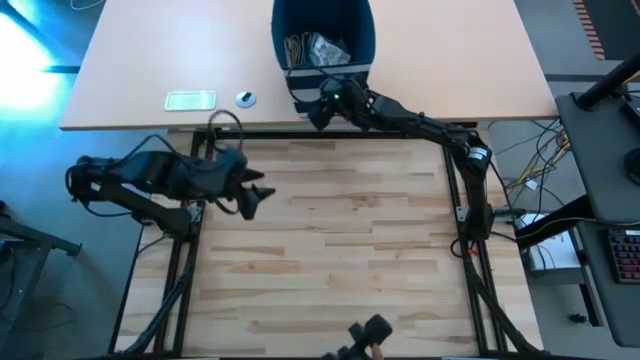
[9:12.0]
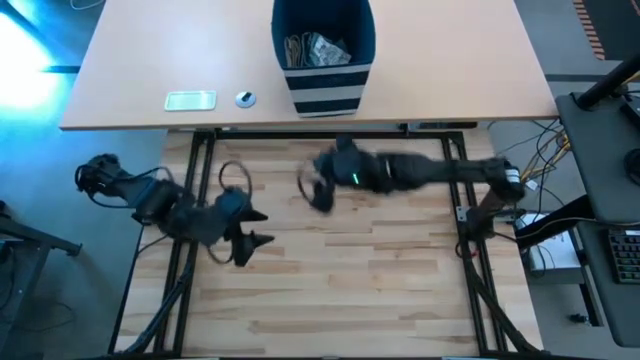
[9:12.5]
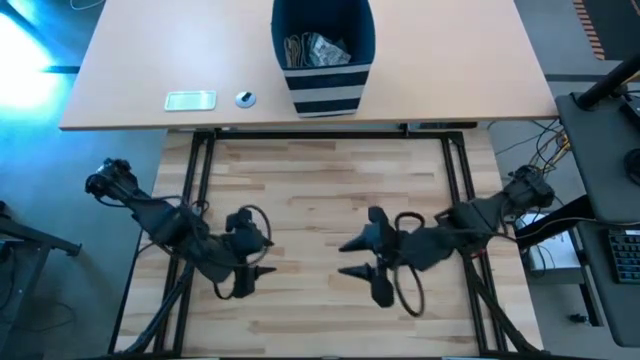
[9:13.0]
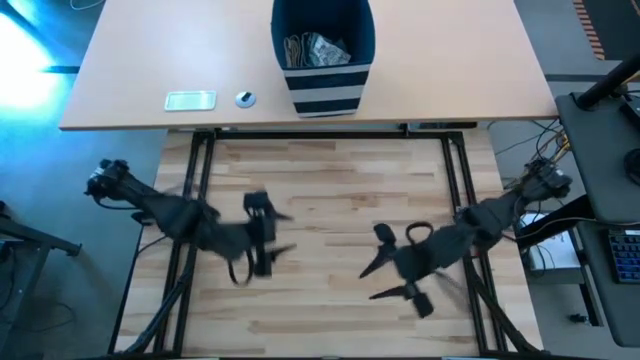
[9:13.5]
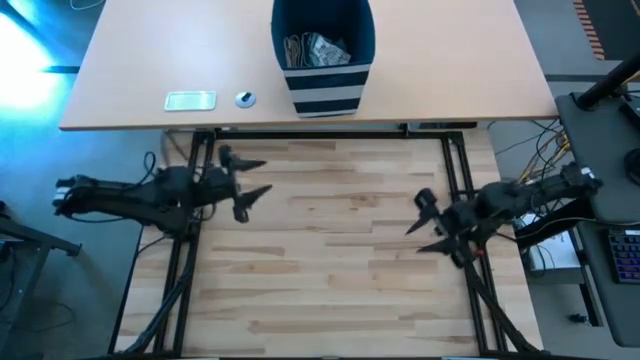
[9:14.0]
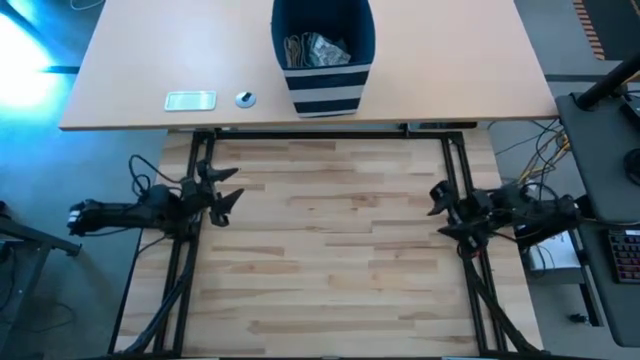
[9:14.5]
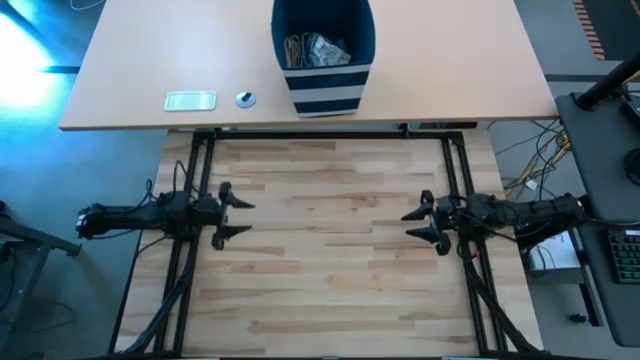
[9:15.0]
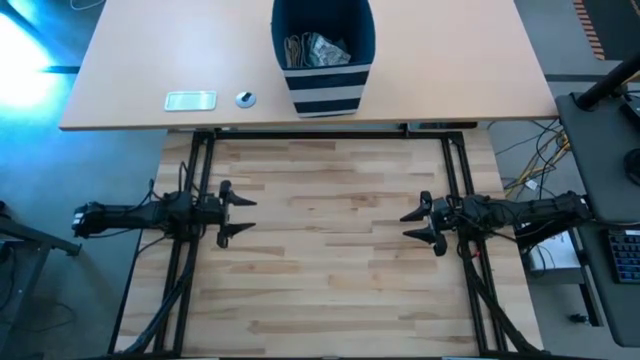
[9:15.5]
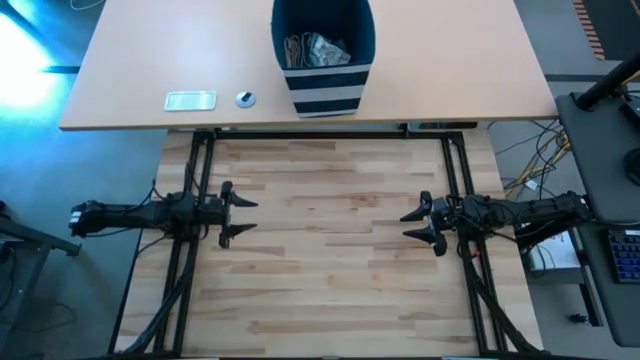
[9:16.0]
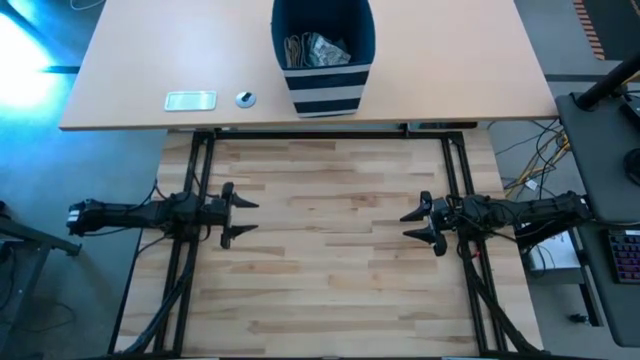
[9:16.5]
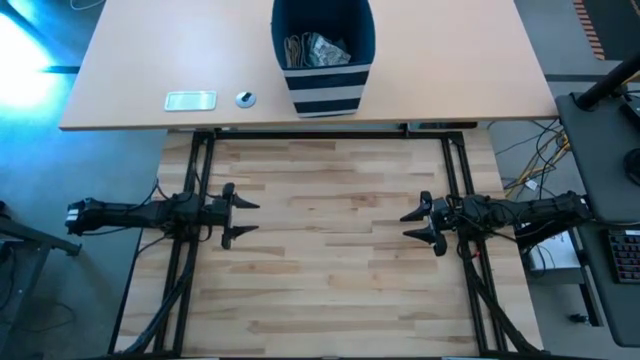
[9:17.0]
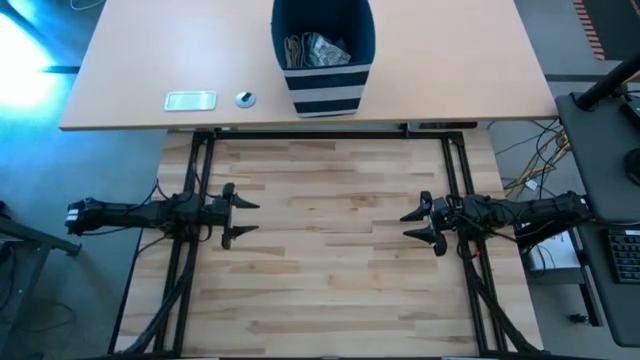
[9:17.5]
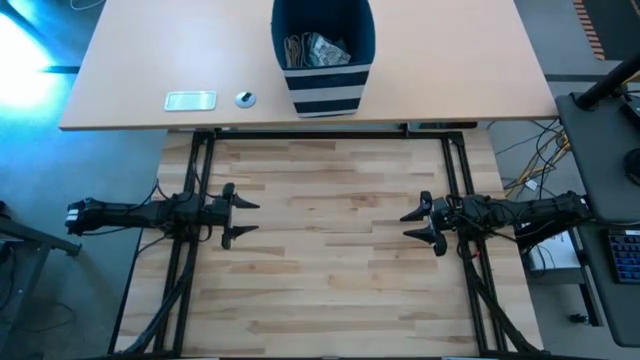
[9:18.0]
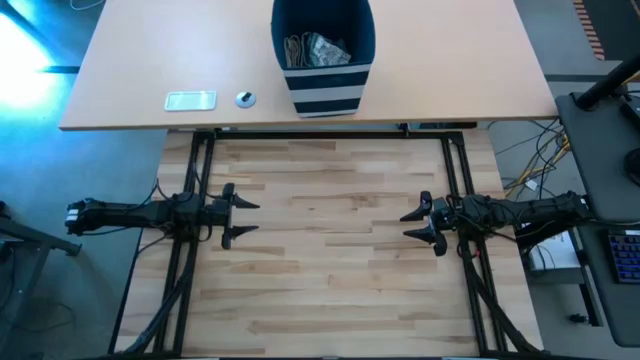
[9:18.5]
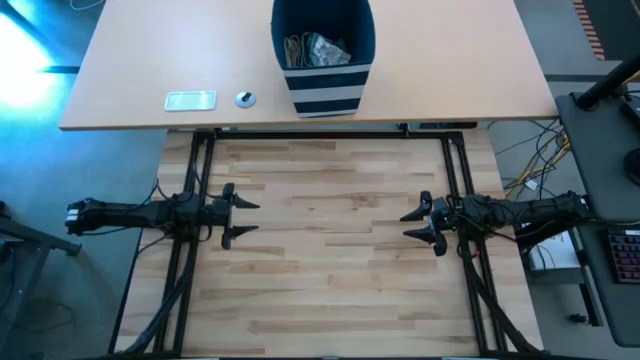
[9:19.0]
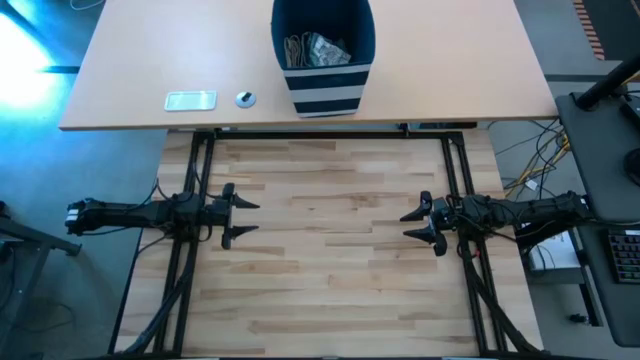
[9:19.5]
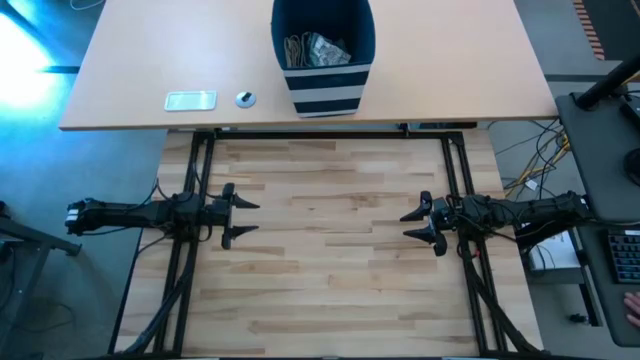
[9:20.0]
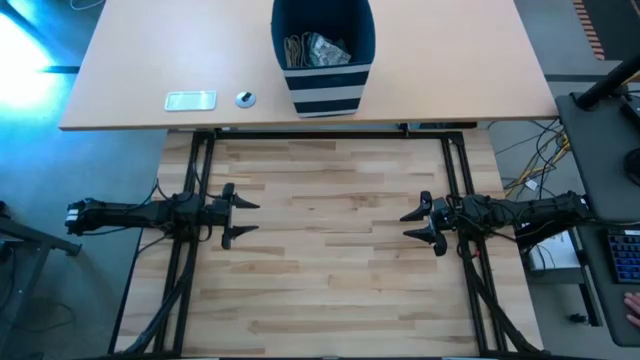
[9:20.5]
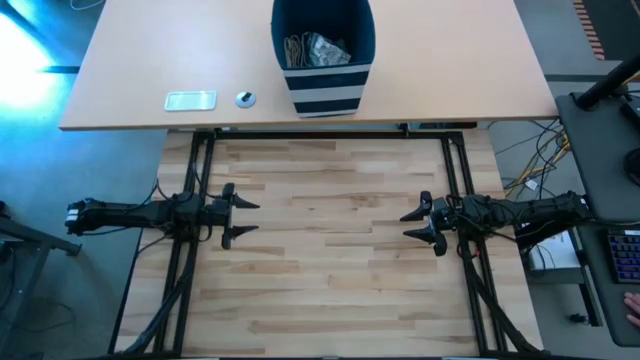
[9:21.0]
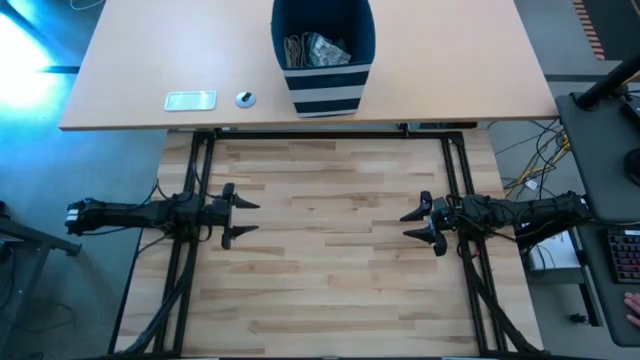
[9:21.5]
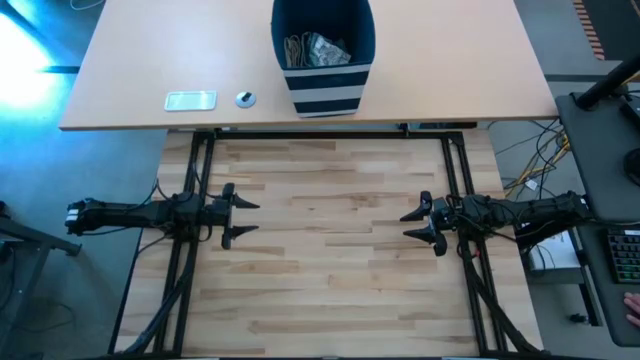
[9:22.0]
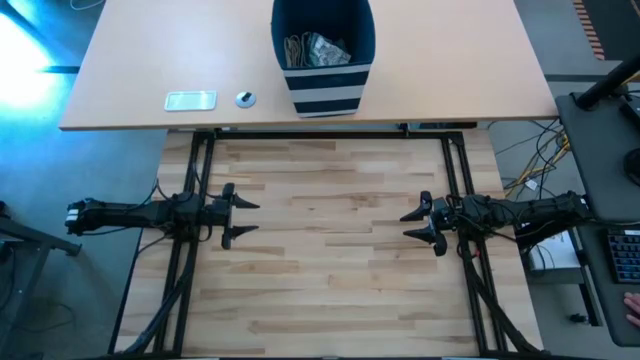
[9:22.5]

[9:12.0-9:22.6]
Task: Fold Laundry from Bin
Return to Home Position

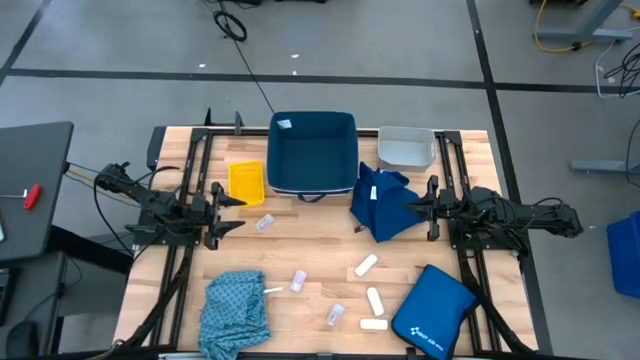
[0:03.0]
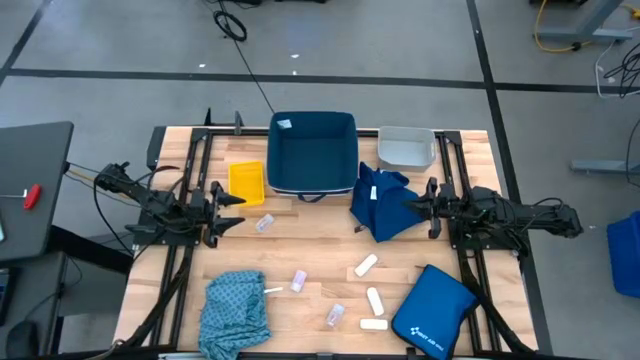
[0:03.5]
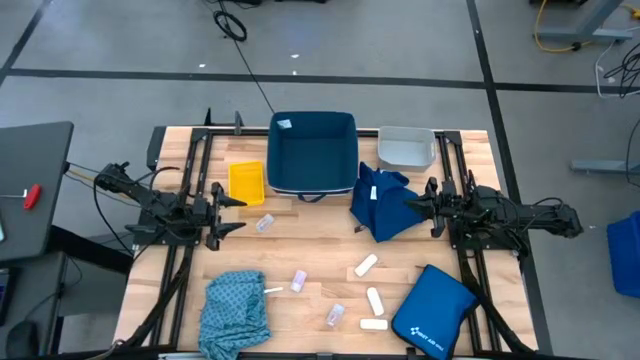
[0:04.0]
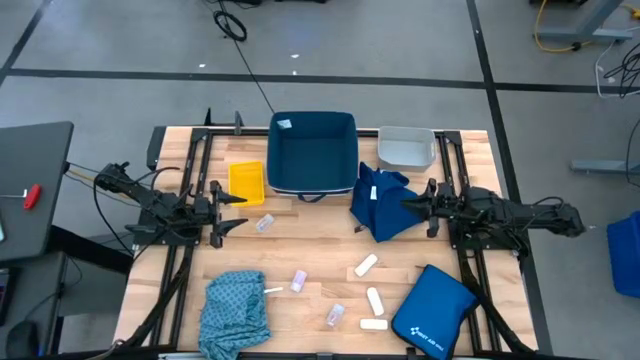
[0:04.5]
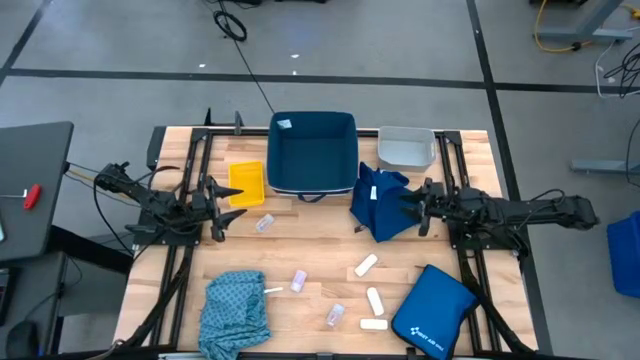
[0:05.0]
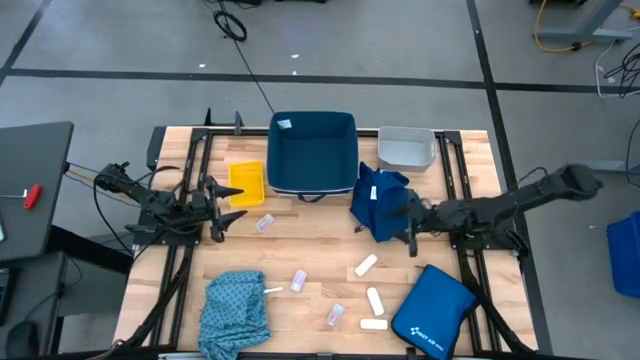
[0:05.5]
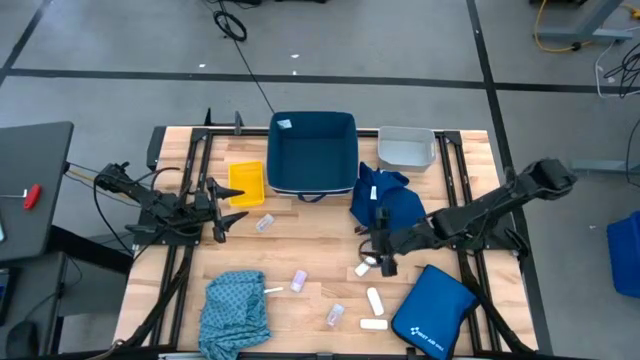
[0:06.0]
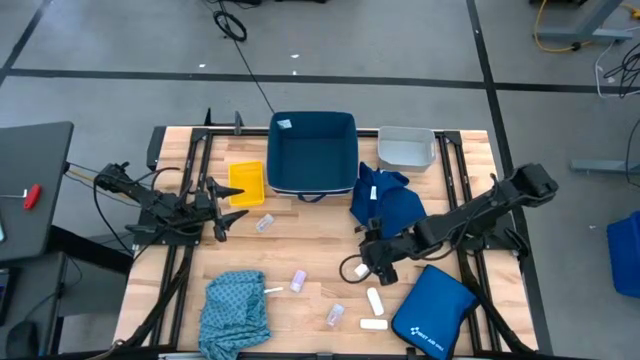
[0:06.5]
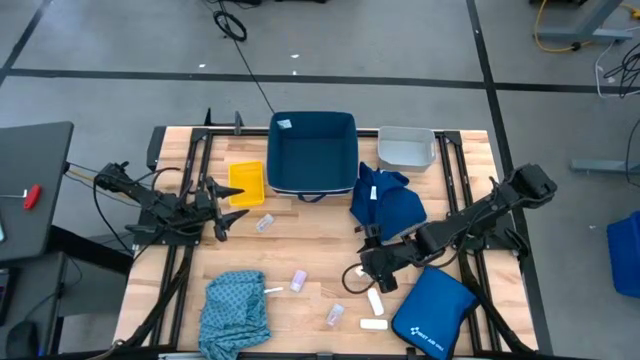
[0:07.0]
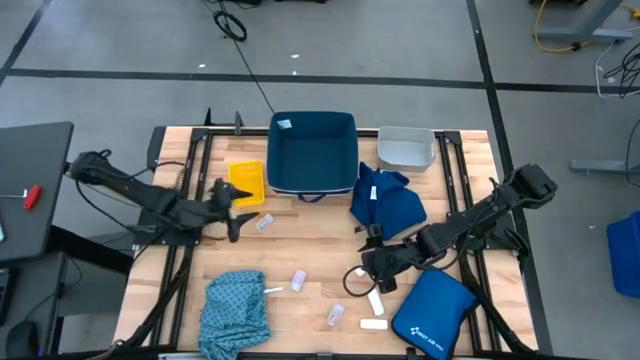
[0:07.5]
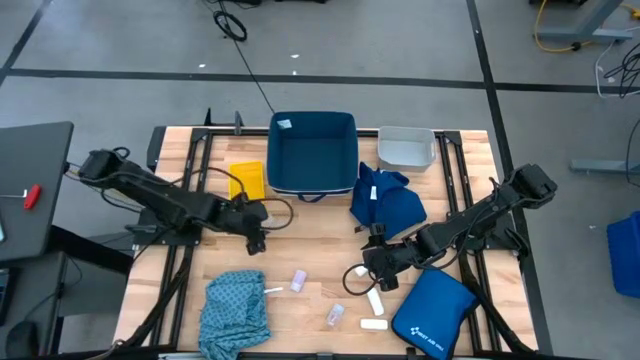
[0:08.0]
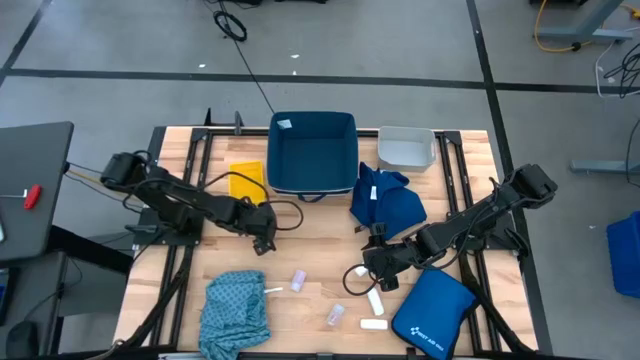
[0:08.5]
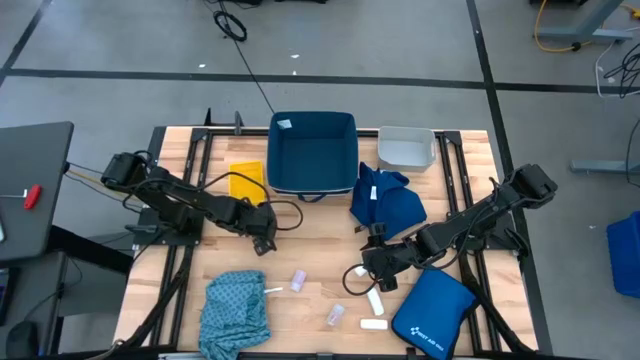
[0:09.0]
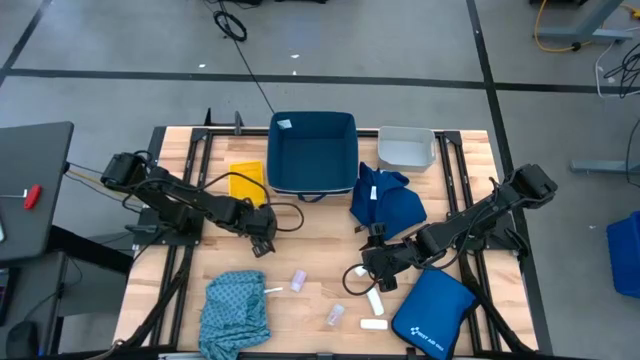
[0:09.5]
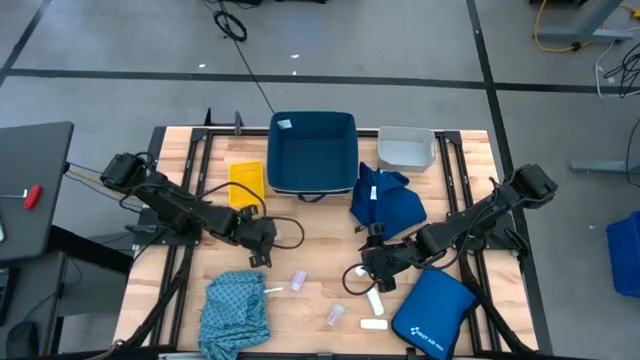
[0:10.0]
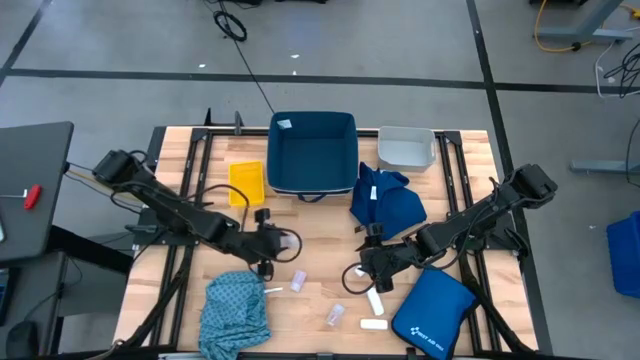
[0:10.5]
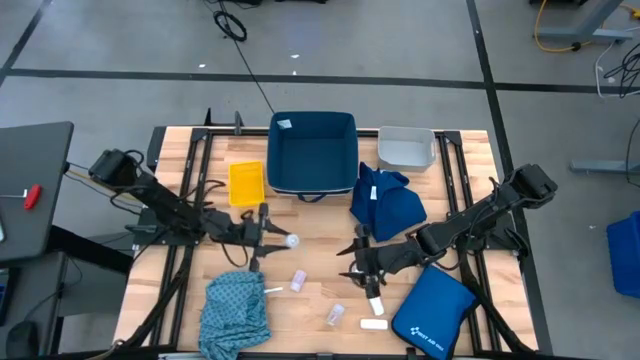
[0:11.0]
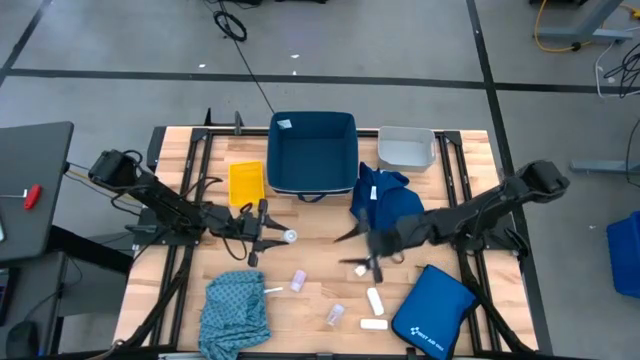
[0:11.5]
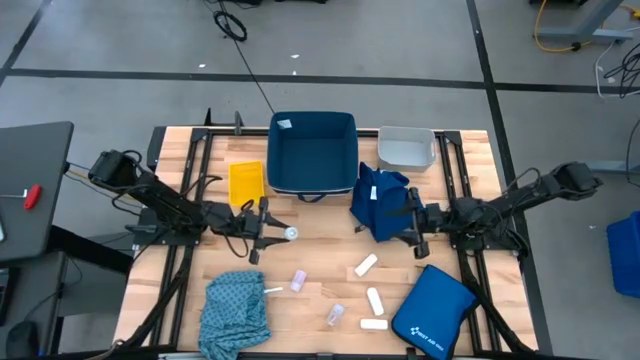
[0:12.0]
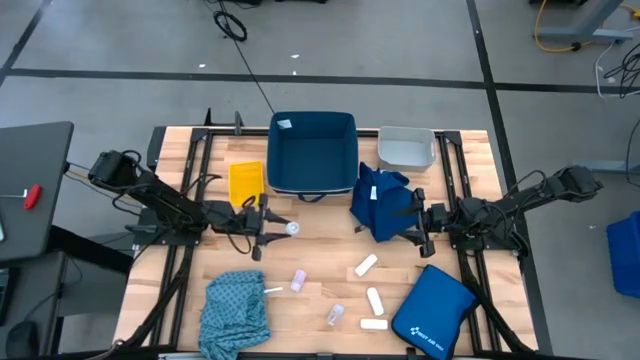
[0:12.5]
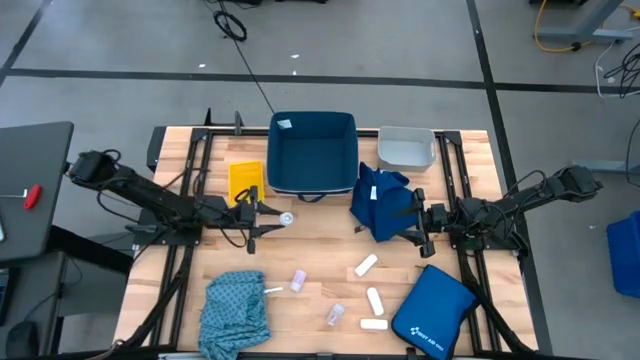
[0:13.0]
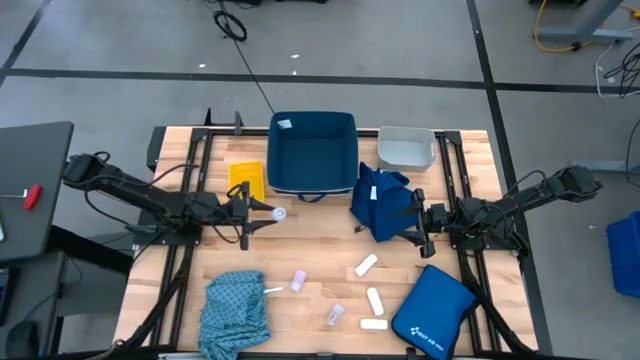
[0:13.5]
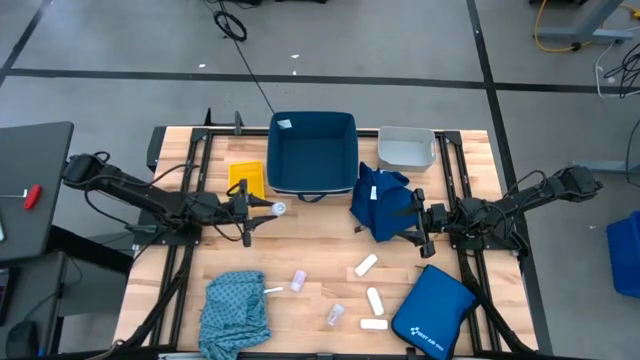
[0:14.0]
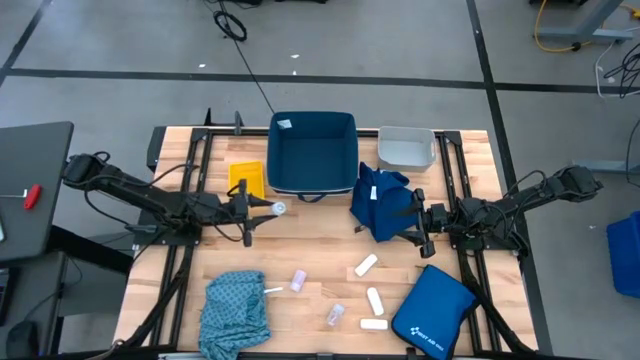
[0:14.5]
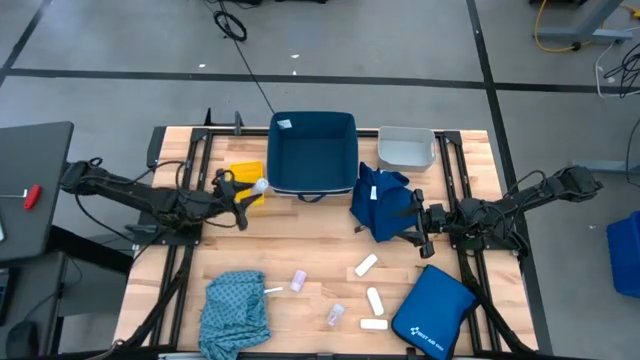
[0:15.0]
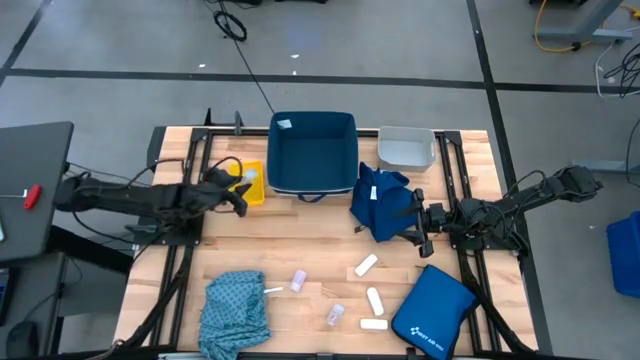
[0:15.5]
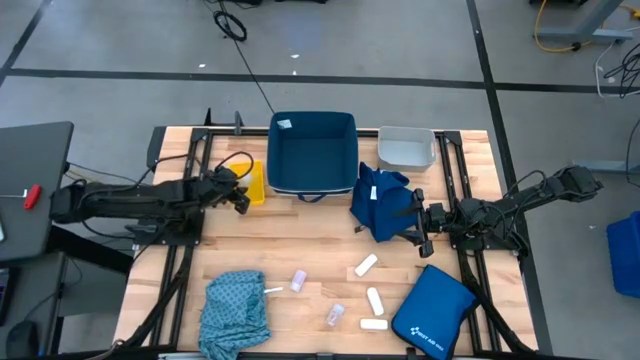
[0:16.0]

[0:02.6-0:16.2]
Task: Pick & place medical supplies in basket/bin
Put the top white pill bottle into the bin
